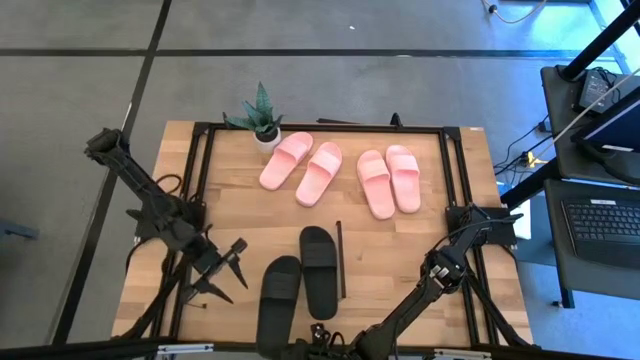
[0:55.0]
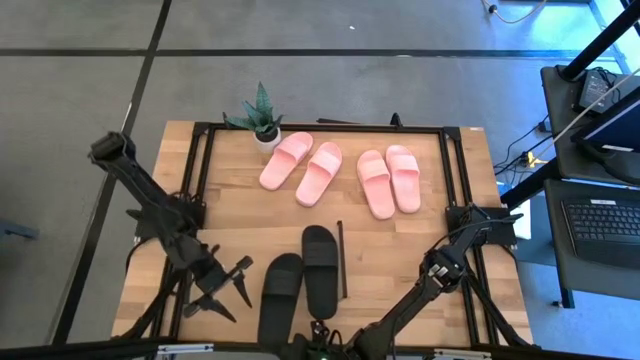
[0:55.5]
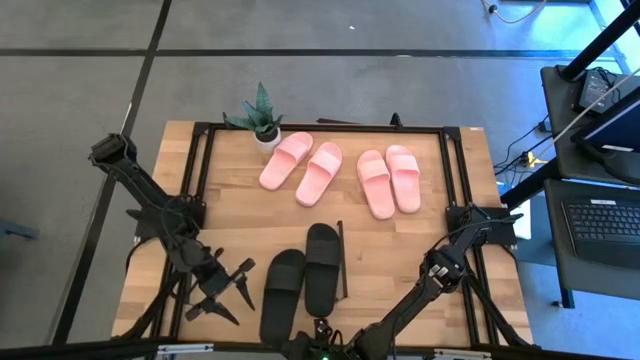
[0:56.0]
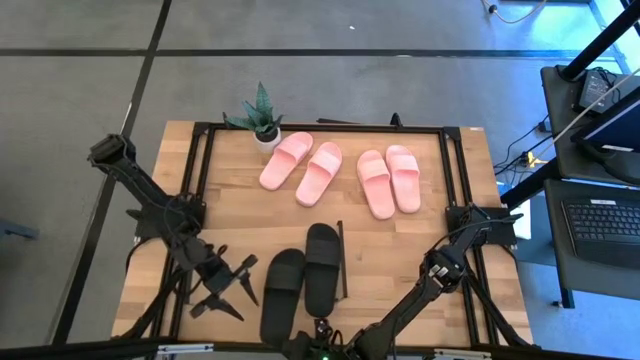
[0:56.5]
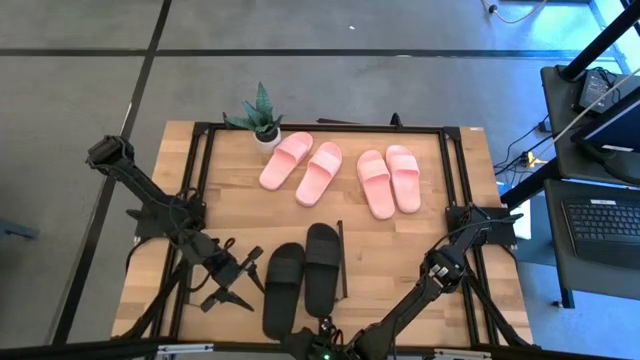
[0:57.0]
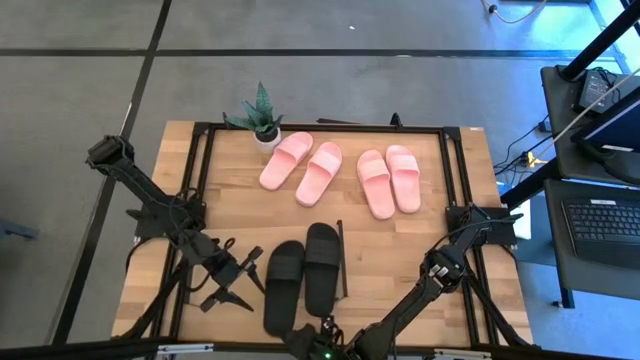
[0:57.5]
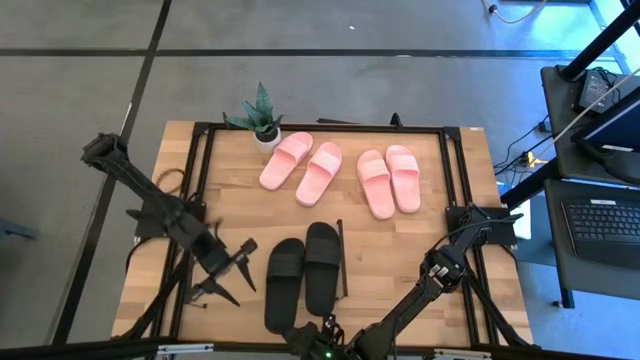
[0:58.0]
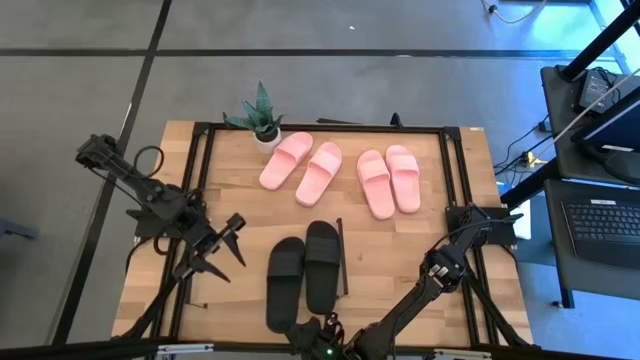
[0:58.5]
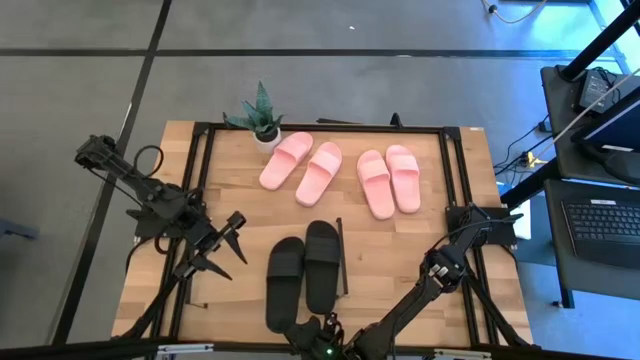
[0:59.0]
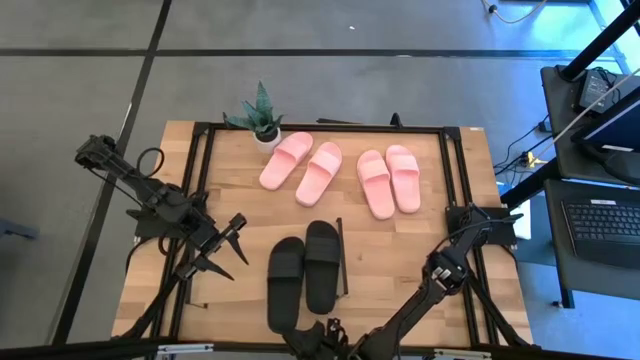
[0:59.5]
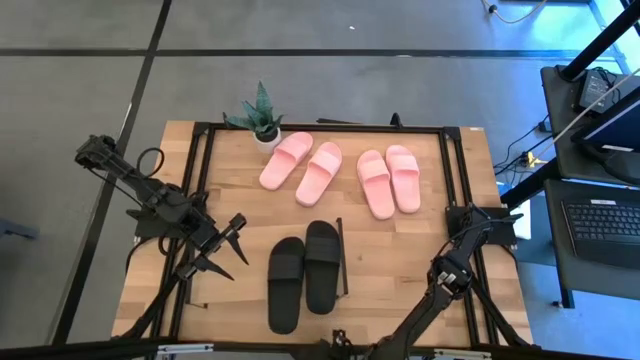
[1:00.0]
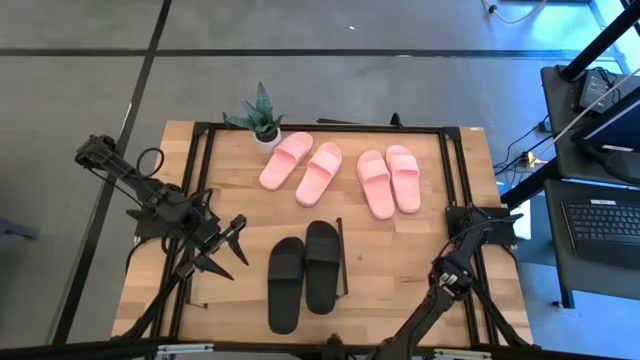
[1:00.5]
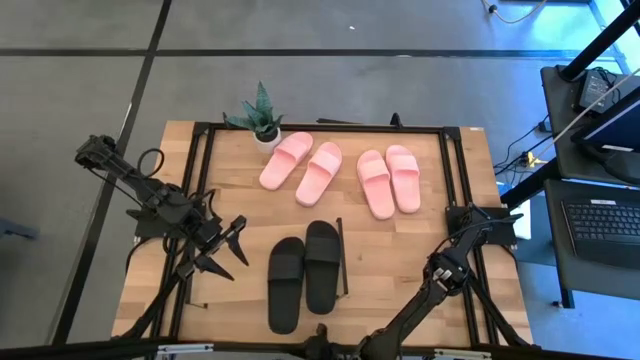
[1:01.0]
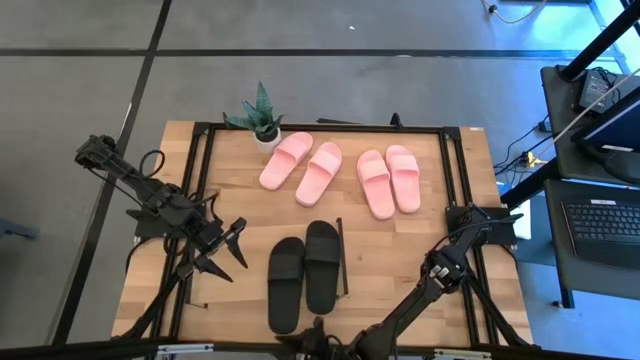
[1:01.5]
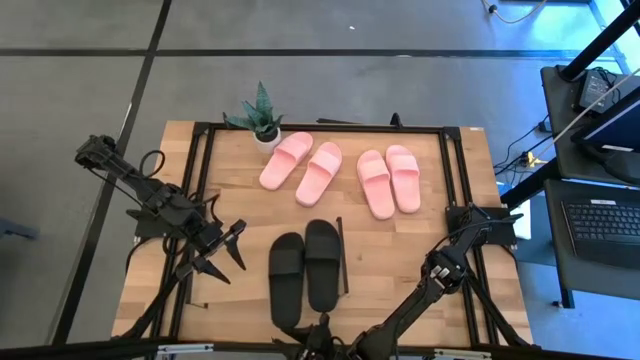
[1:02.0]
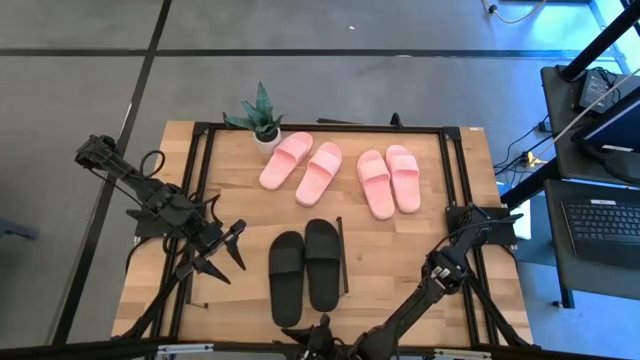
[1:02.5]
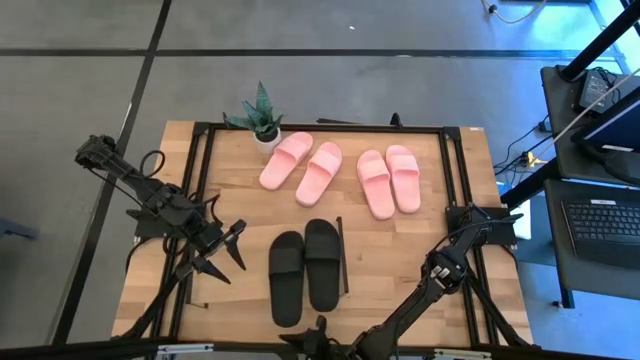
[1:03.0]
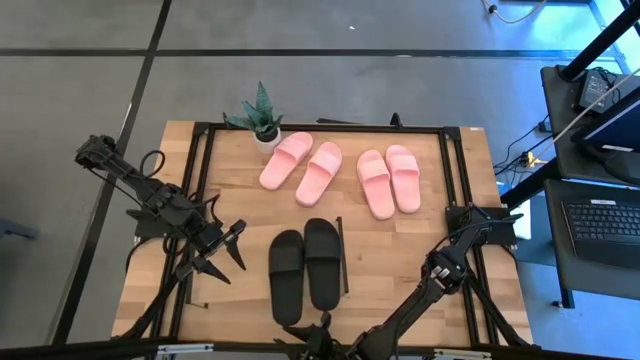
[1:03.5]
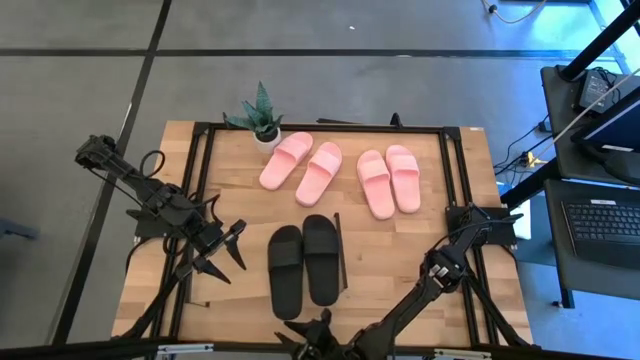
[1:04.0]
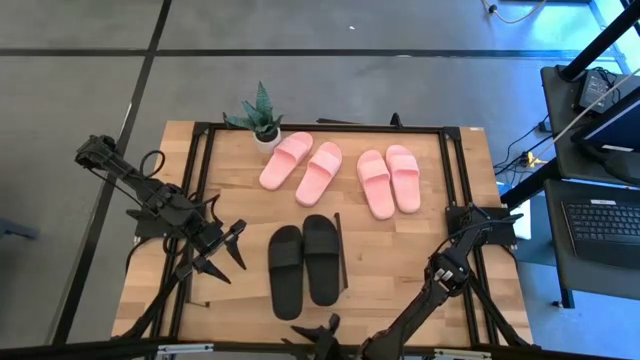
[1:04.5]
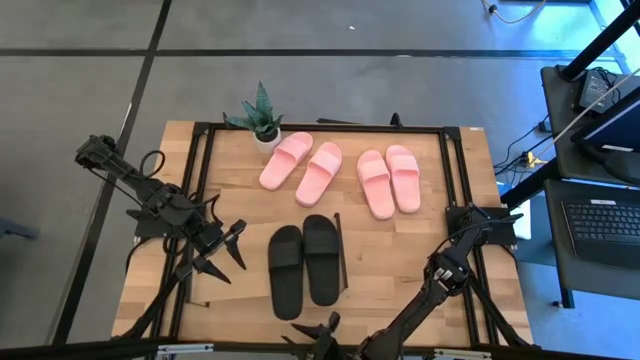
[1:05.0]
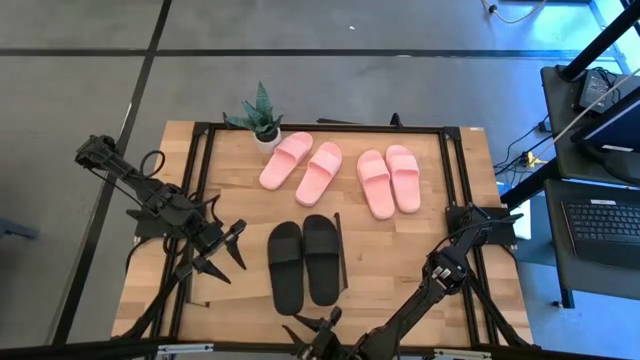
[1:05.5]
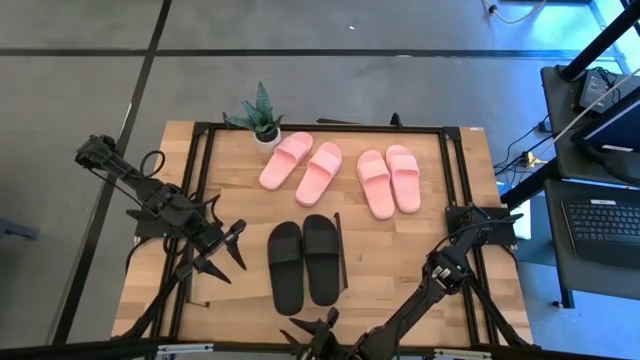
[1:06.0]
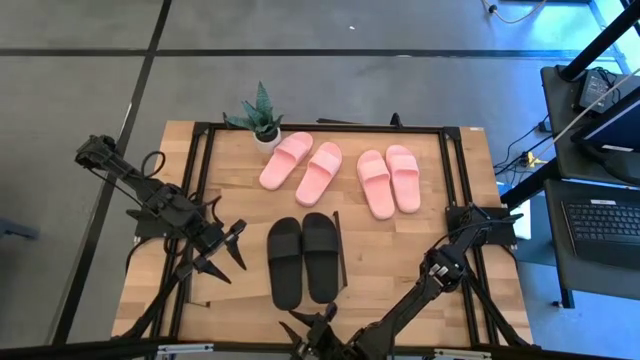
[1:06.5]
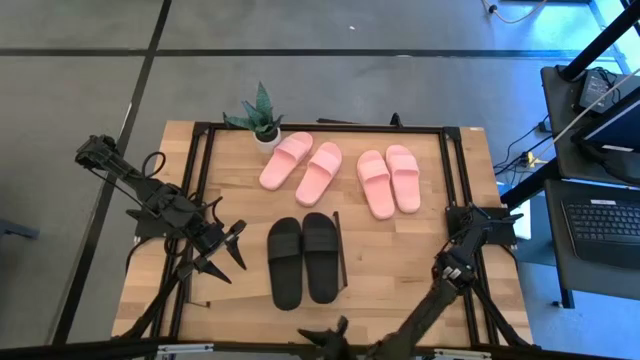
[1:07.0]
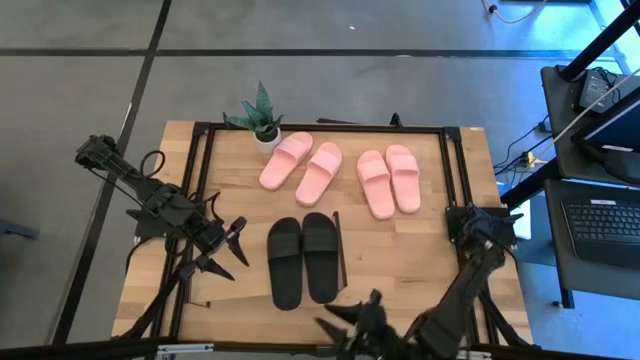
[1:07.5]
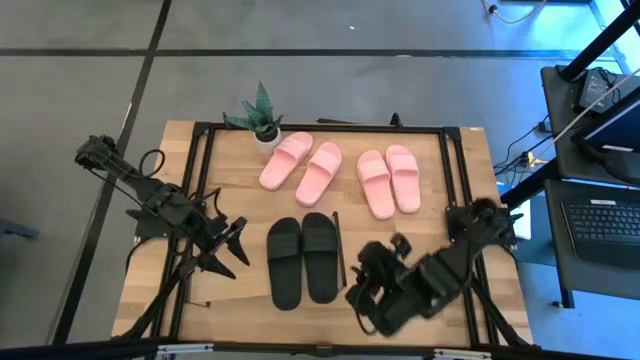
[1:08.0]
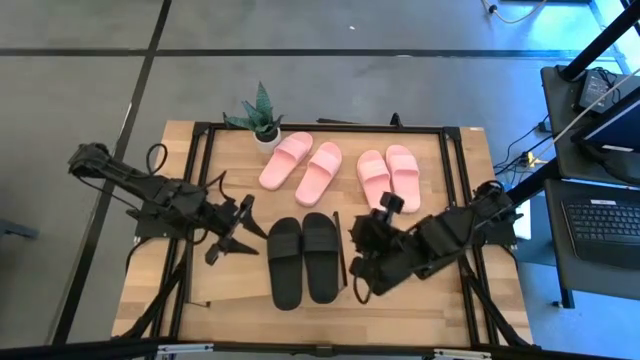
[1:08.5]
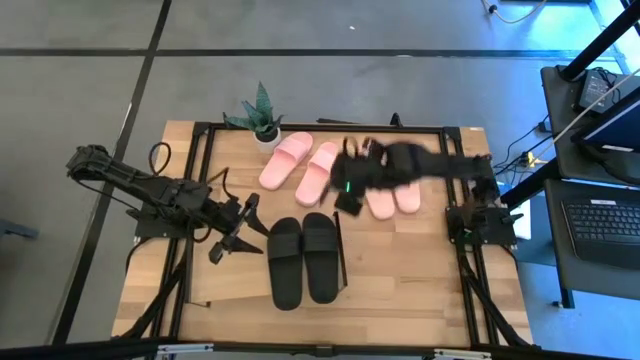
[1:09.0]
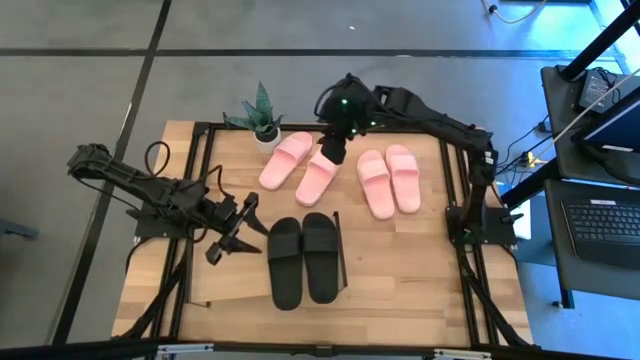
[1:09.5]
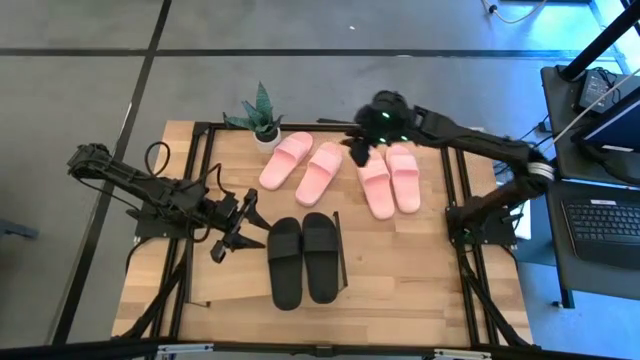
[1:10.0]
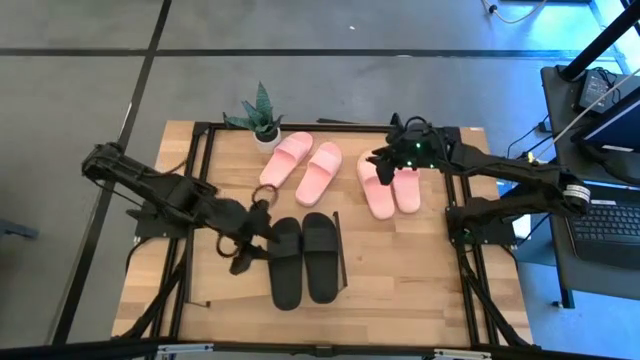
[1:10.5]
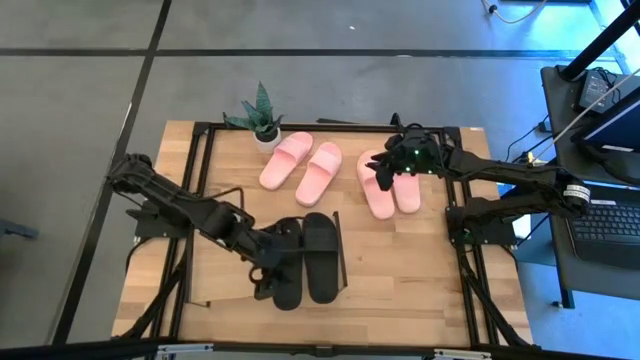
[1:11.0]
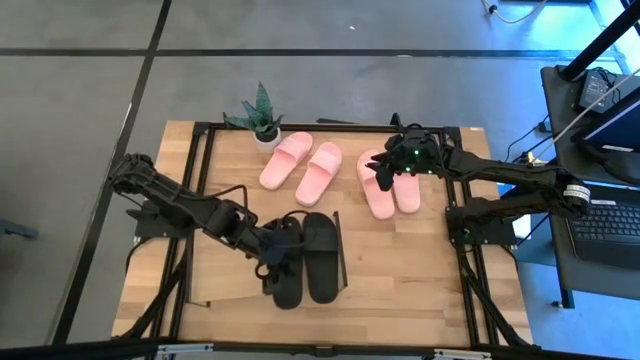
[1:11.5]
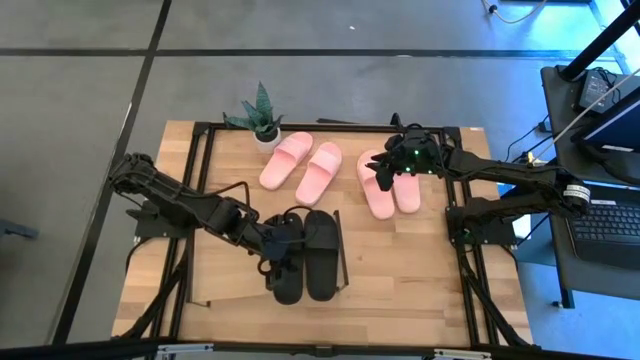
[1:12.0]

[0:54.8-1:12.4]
Task: Pick and place slides into the shelf
Put the black slide on the shelf

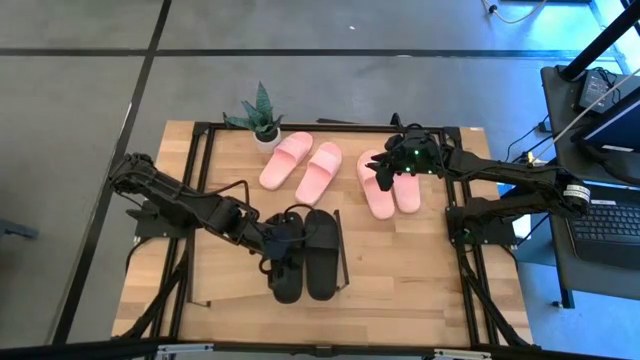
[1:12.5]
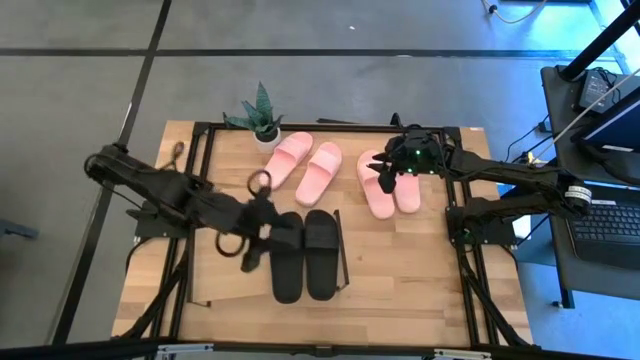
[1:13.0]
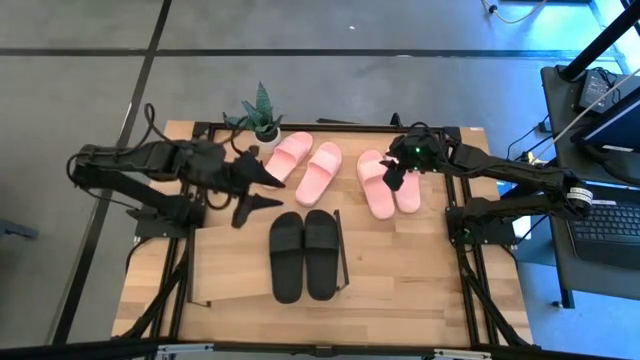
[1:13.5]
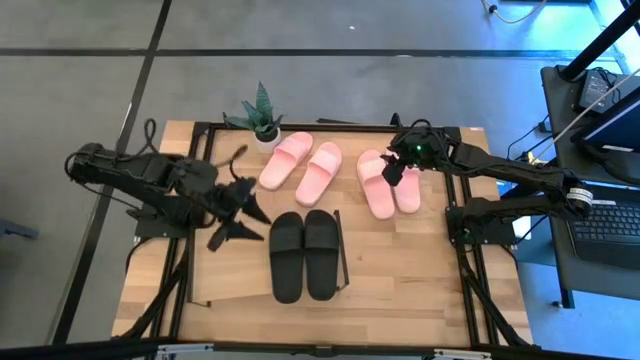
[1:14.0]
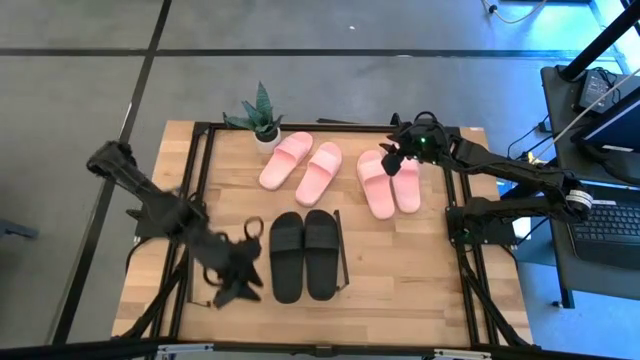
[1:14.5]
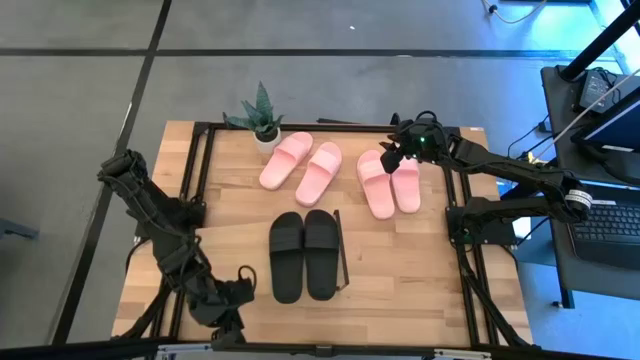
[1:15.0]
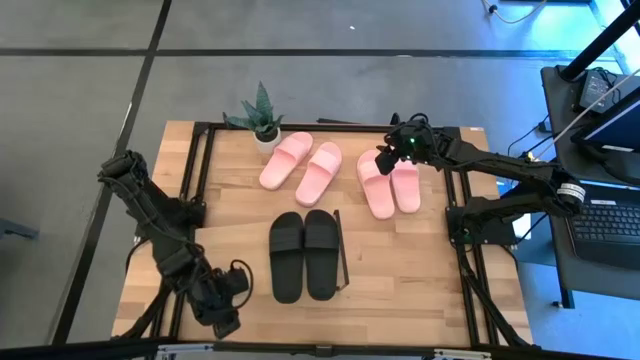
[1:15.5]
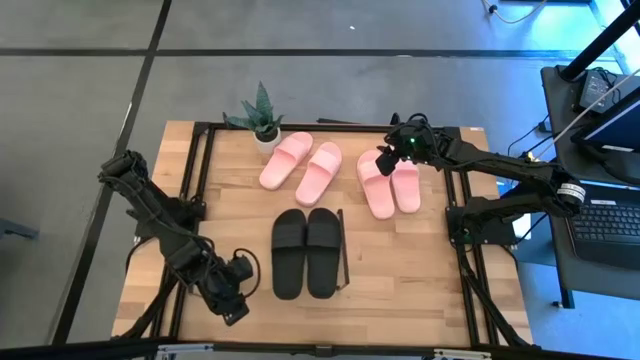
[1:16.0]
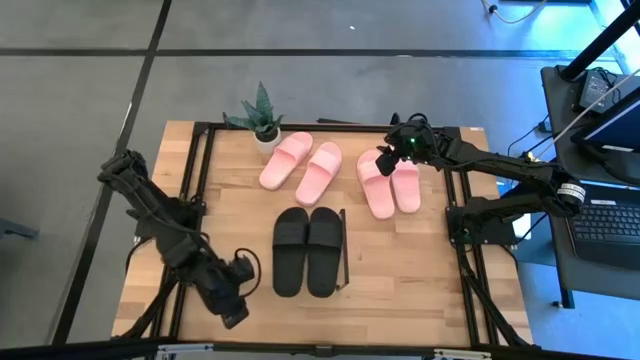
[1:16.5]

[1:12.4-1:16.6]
Adjust the shelf
